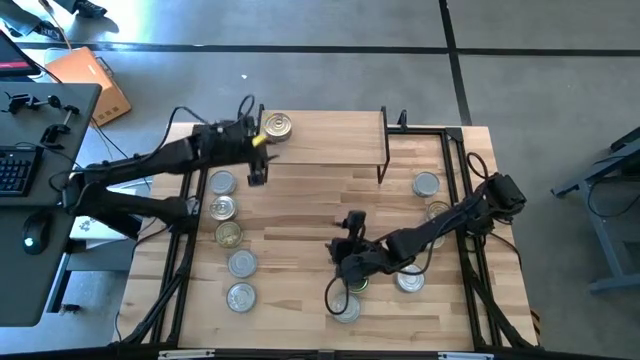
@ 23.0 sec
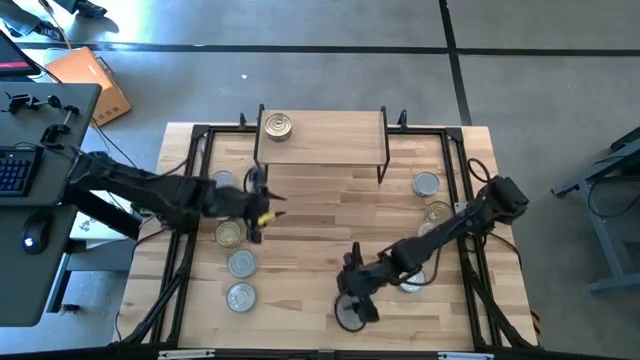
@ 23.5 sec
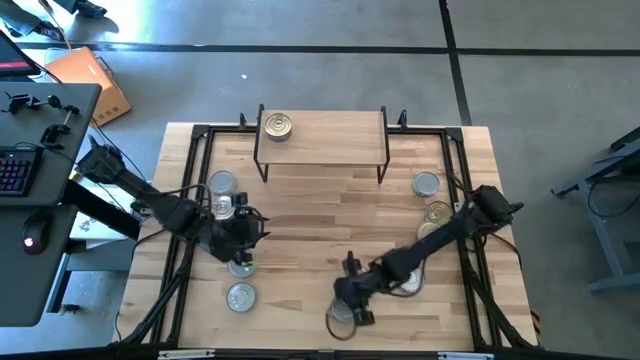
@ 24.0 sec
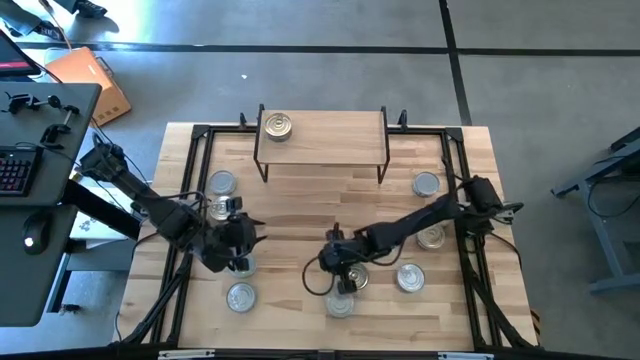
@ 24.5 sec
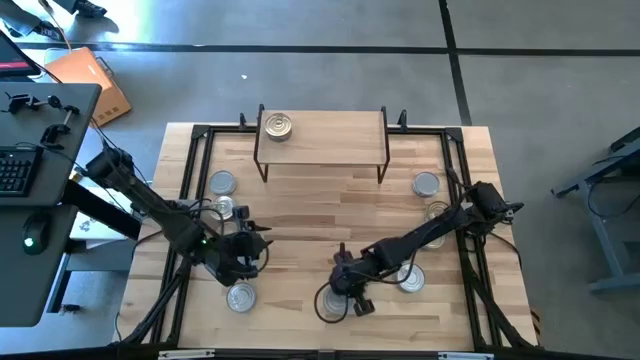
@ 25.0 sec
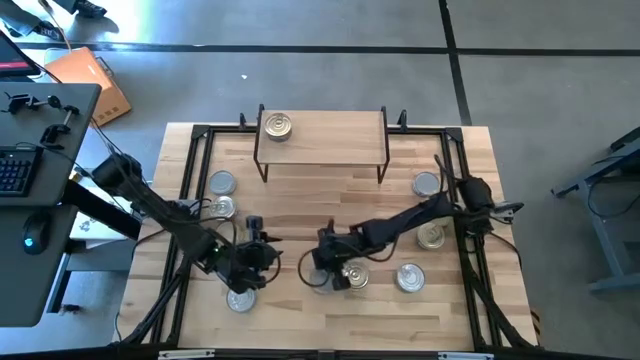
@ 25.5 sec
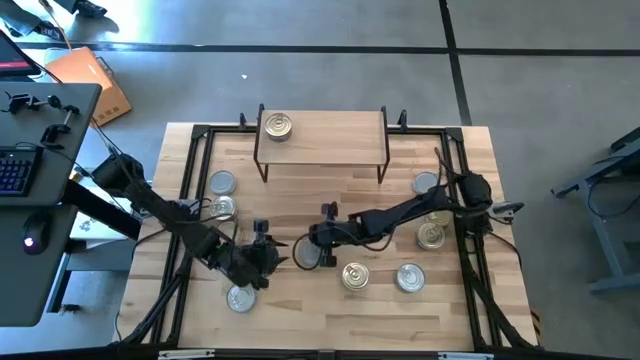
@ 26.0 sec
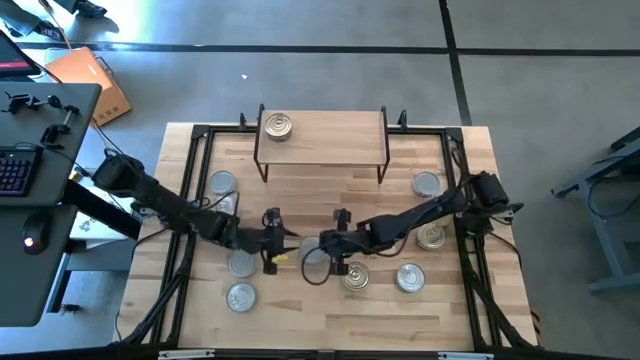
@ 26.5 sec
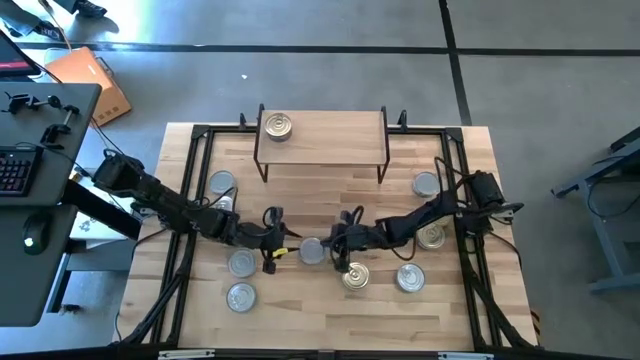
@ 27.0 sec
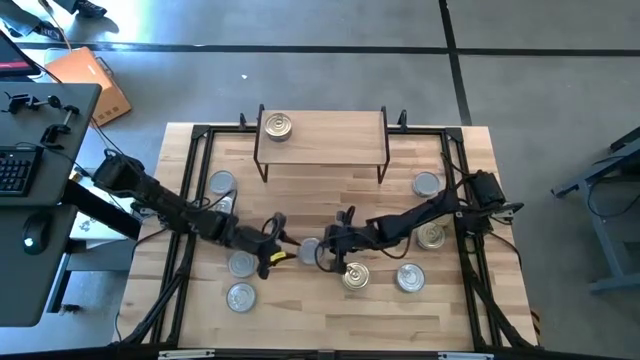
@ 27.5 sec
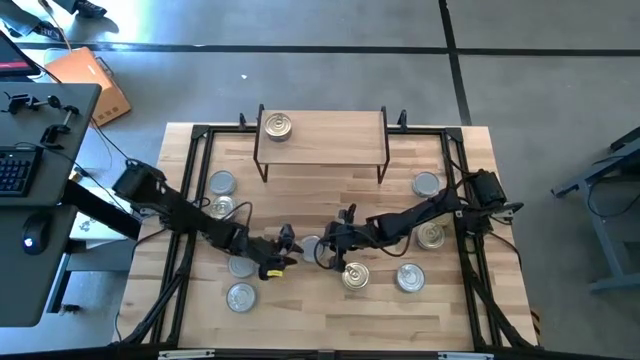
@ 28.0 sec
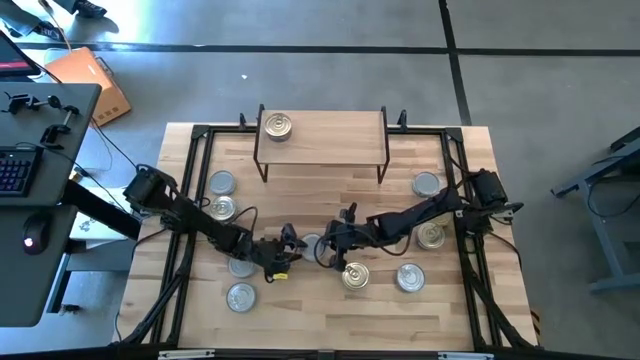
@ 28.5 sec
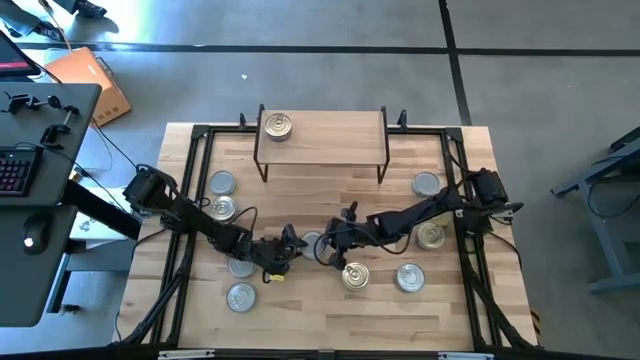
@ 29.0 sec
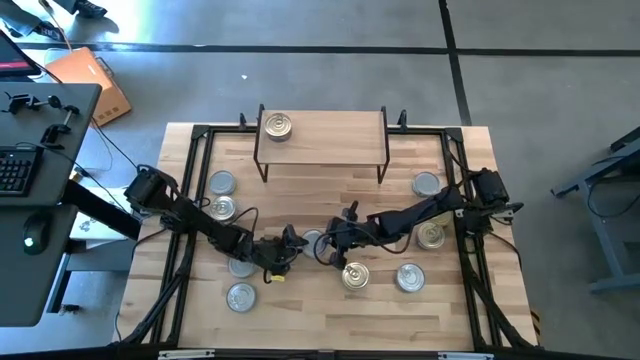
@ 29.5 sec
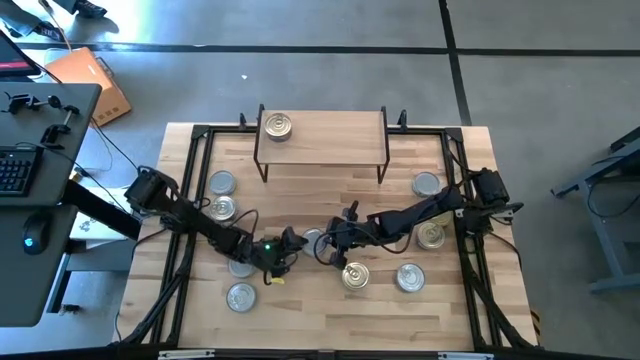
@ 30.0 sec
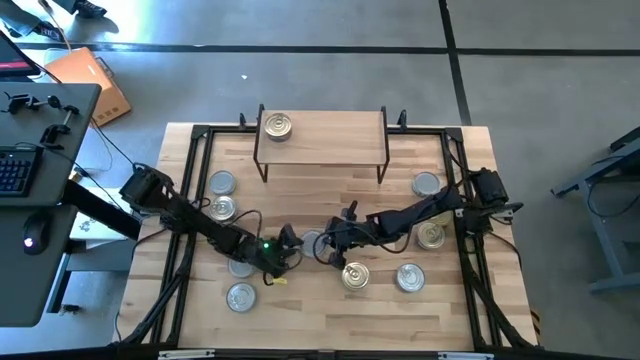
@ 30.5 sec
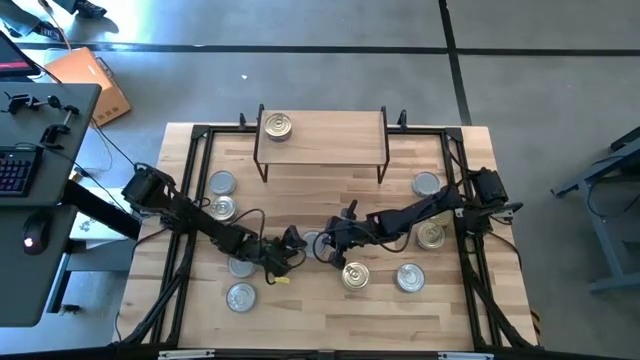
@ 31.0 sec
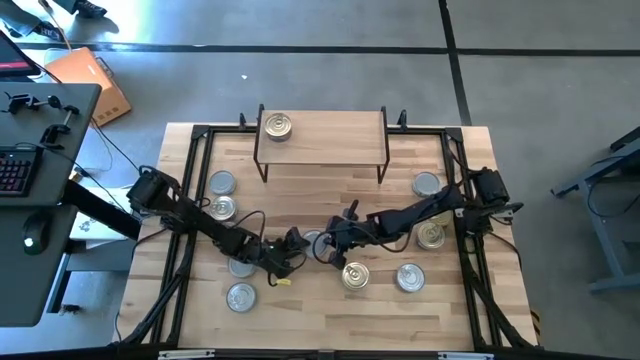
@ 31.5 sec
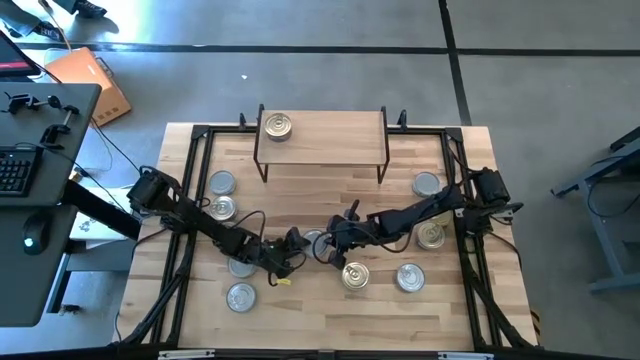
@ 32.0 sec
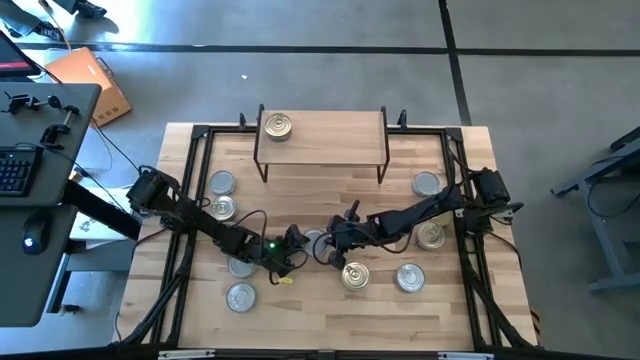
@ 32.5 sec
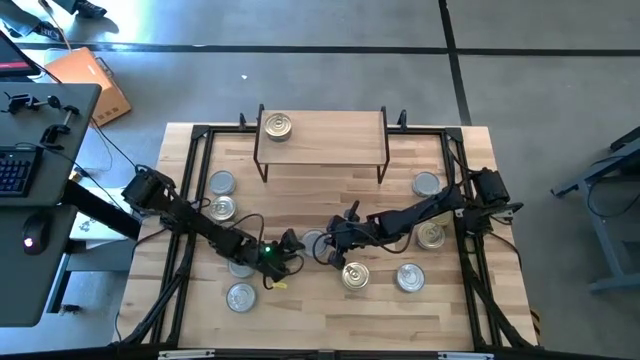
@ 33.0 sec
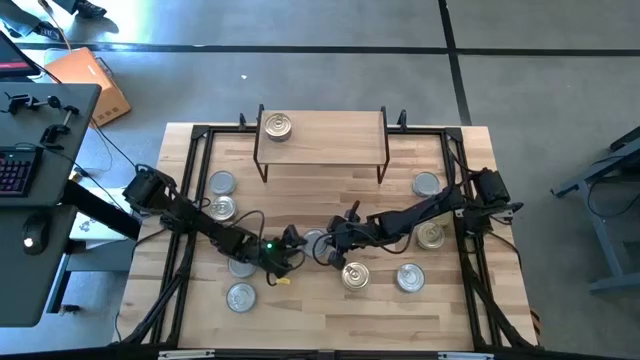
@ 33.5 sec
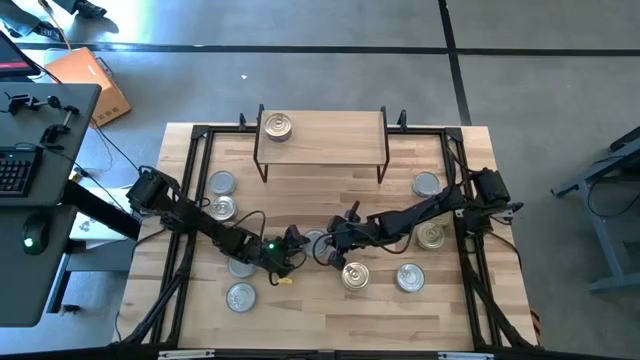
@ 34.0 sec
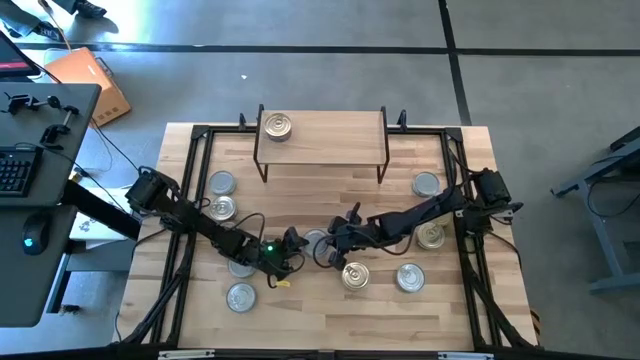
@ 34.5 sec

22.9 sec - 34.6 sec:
Task: Stack canned seafood by type on shelf
Put the green and white tuna can on the shelf

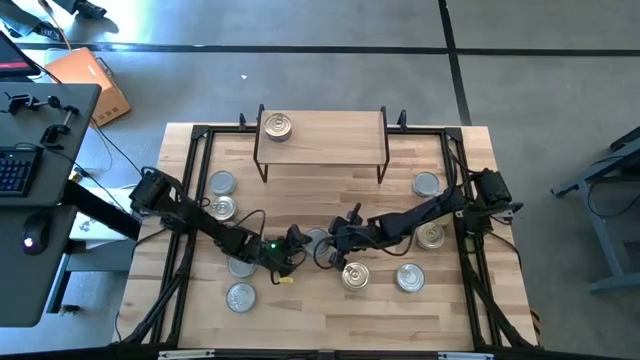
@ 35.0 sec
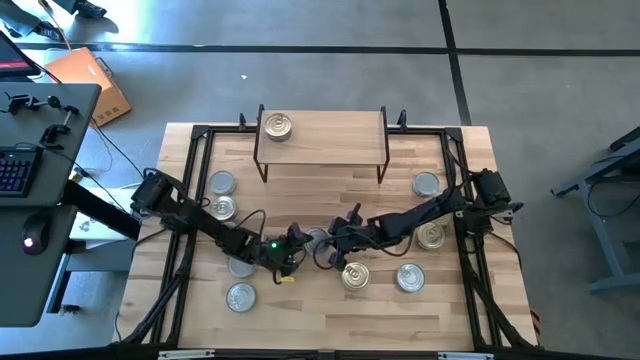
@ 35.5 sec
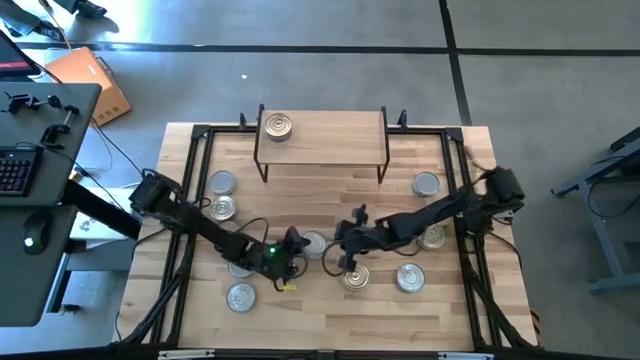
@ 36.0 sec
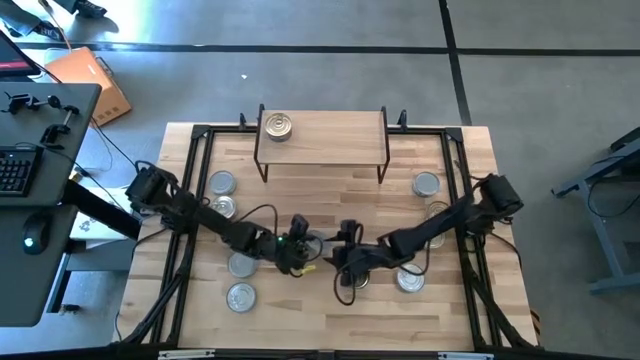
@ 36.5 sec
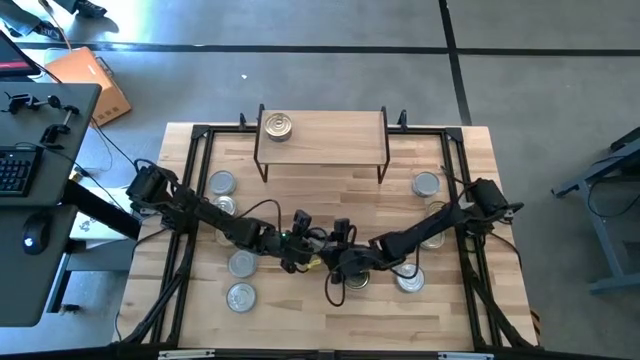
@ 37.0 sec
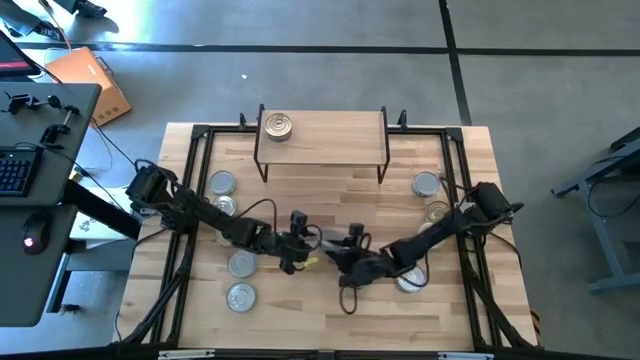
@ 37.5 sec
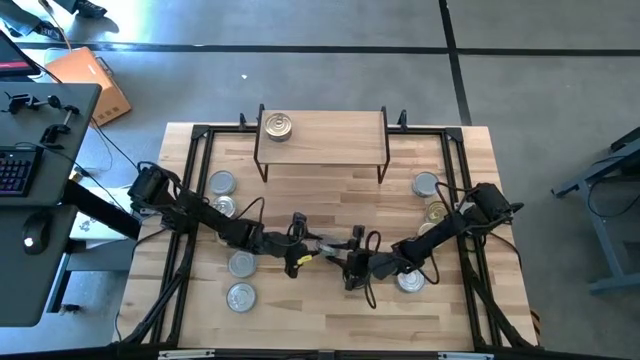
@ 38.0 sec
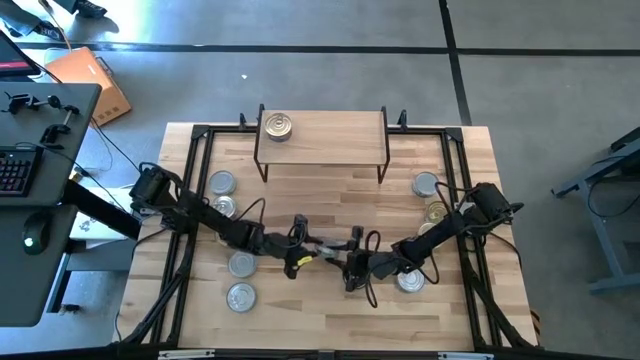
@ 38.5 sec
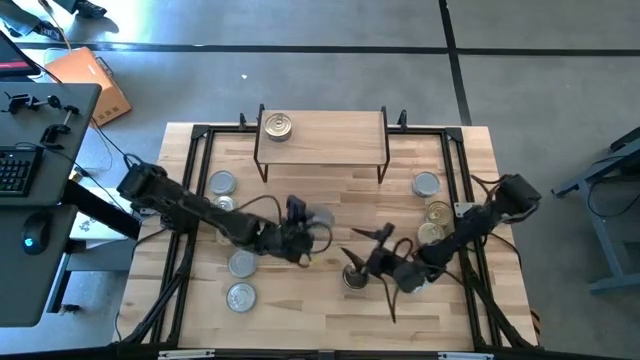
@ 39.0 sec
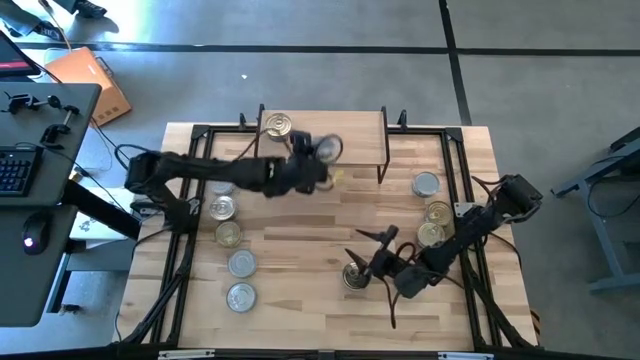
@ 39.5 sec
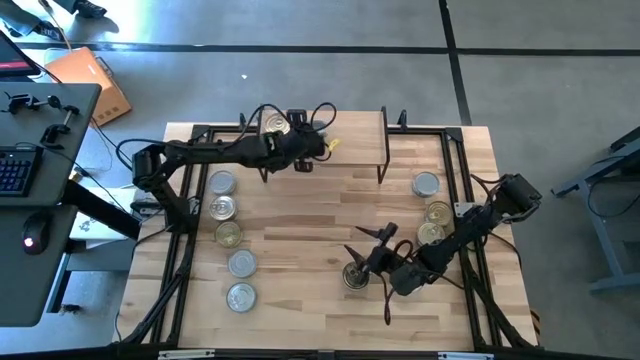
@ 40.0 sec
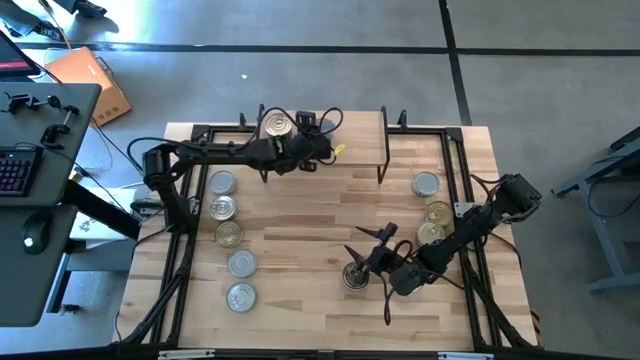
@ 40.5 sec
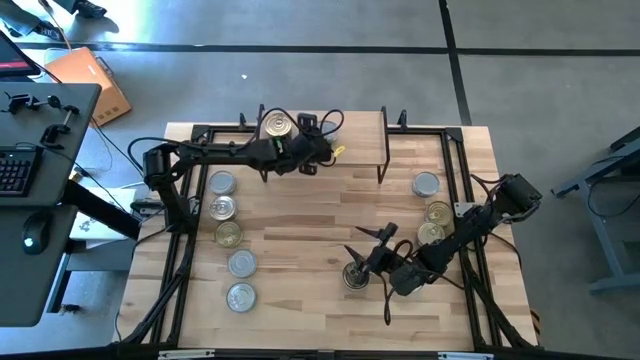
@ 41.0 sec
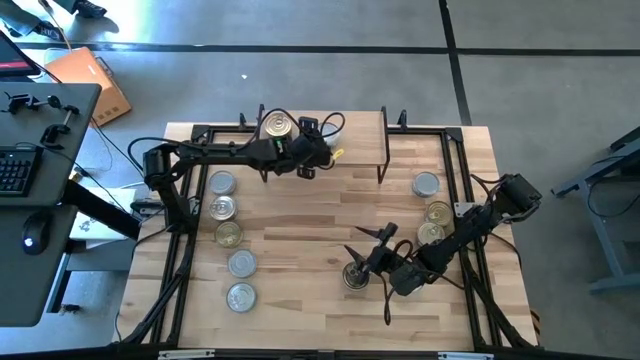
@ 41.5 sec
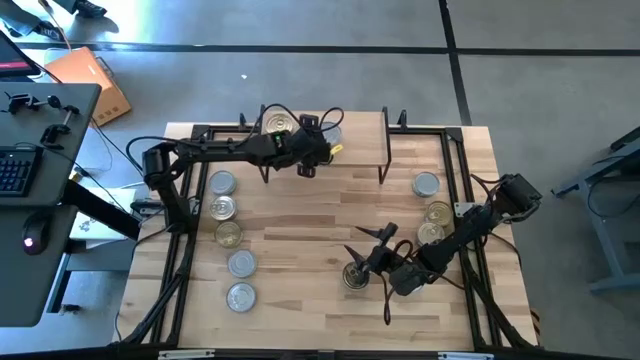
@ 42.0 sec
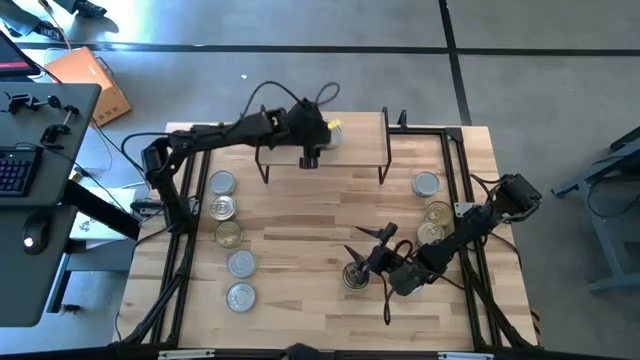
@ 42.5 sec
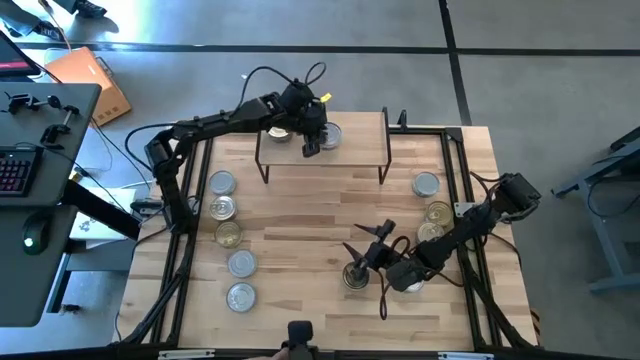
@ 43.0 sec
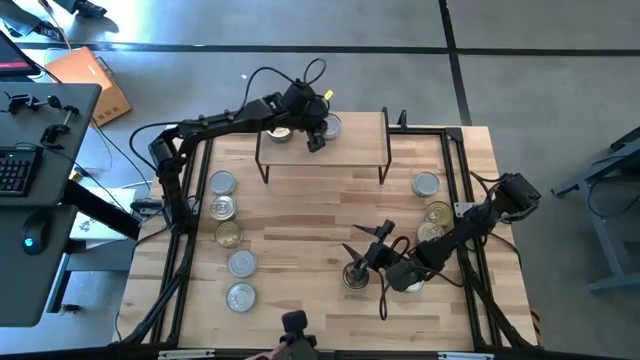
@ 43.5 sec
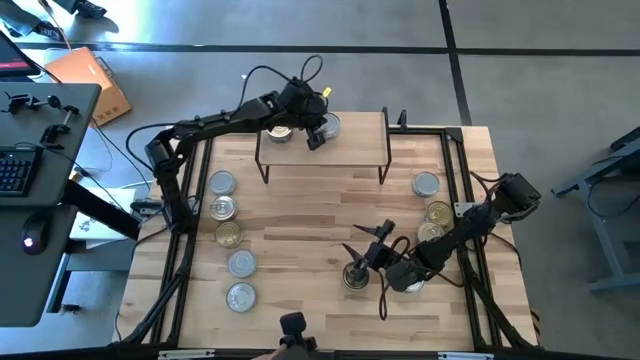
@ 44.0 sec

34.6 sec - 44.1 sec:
Put the green and white tuna can on the shelf
